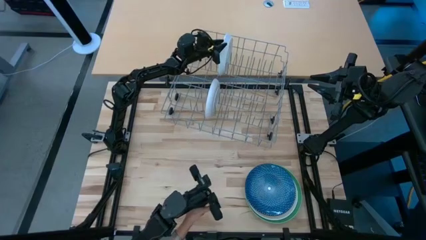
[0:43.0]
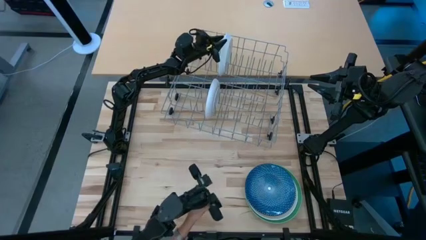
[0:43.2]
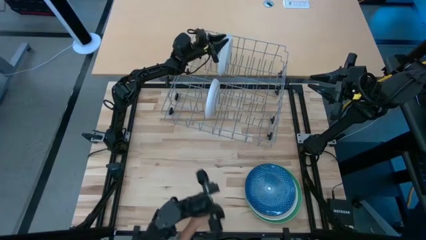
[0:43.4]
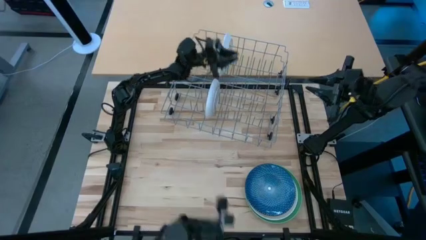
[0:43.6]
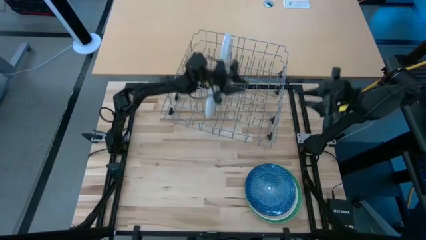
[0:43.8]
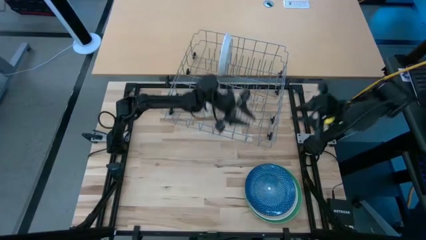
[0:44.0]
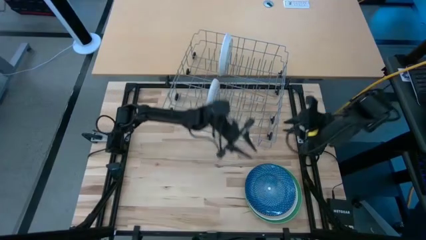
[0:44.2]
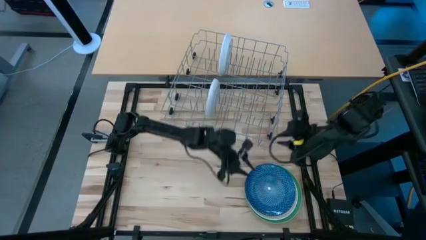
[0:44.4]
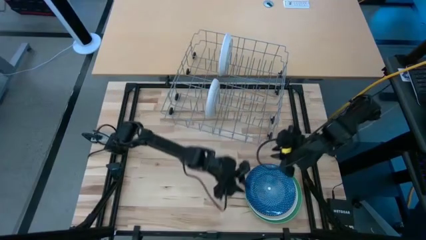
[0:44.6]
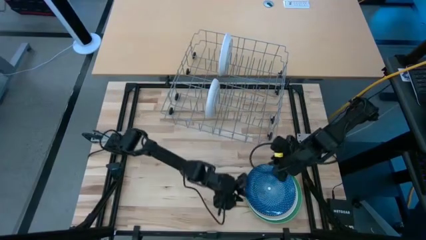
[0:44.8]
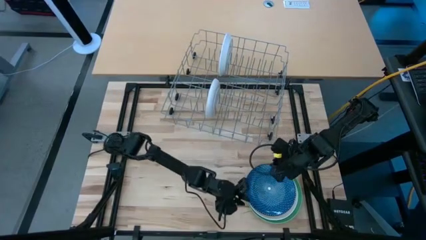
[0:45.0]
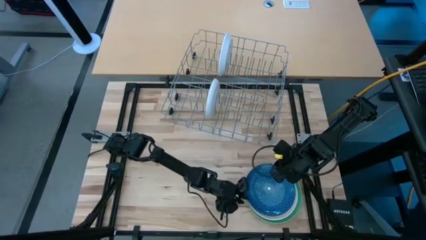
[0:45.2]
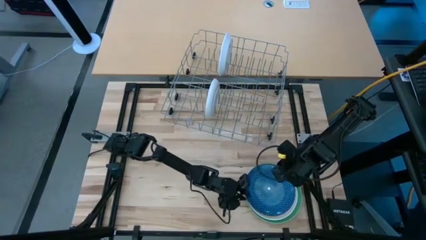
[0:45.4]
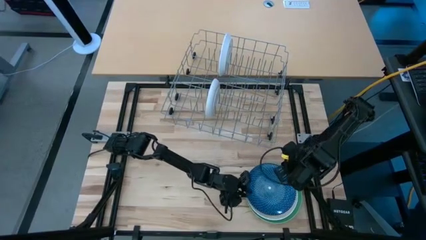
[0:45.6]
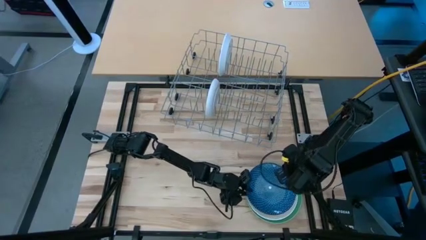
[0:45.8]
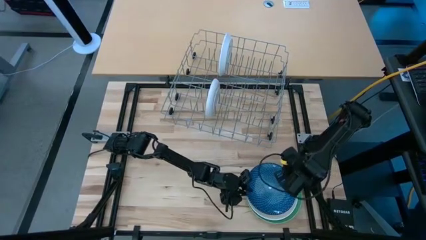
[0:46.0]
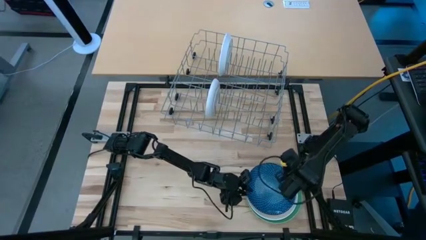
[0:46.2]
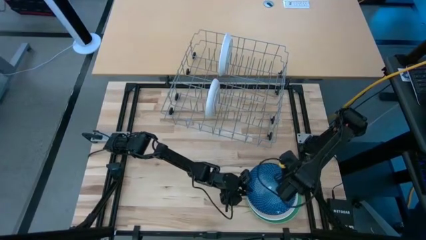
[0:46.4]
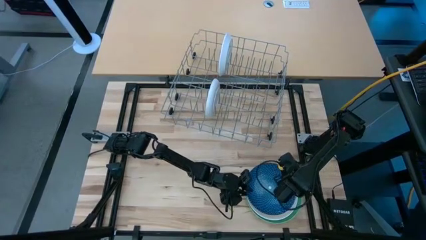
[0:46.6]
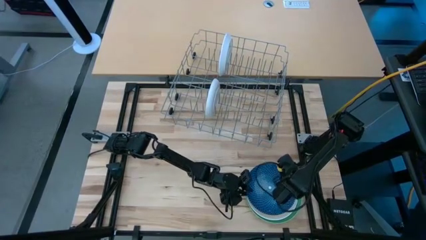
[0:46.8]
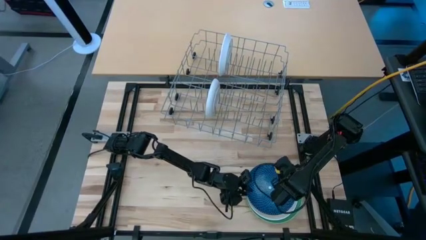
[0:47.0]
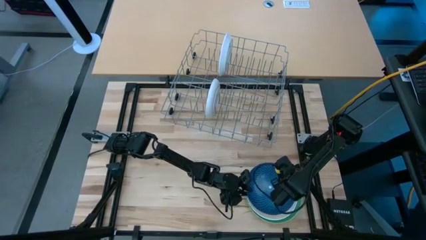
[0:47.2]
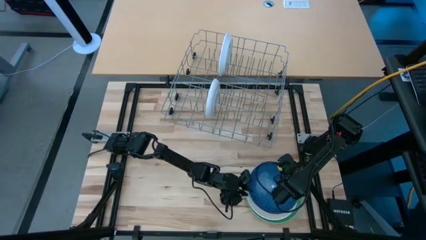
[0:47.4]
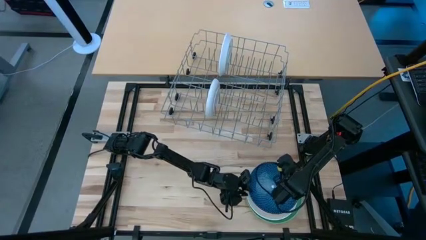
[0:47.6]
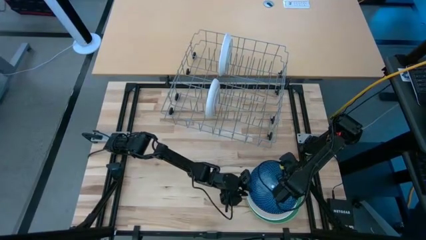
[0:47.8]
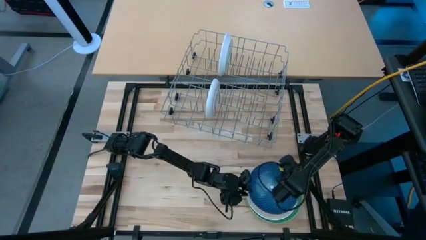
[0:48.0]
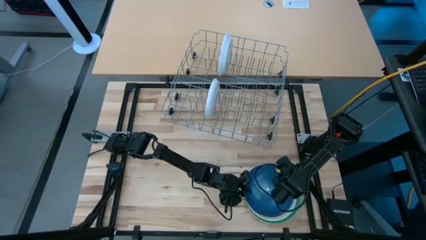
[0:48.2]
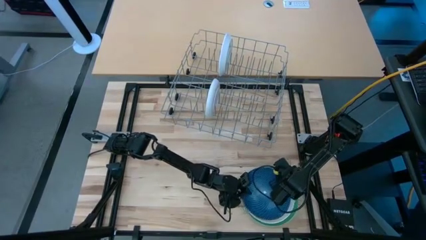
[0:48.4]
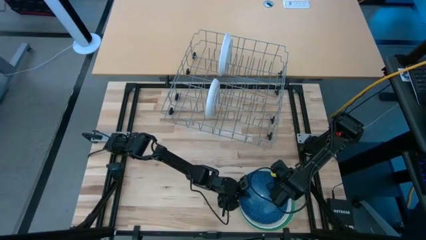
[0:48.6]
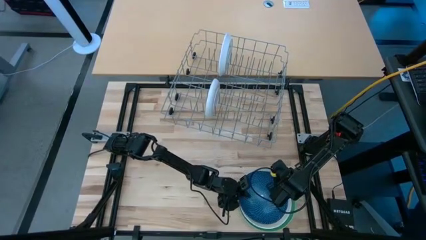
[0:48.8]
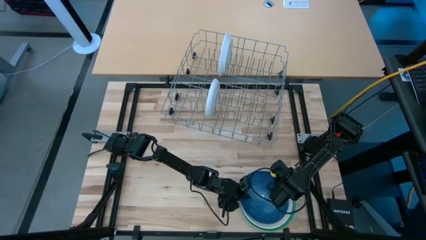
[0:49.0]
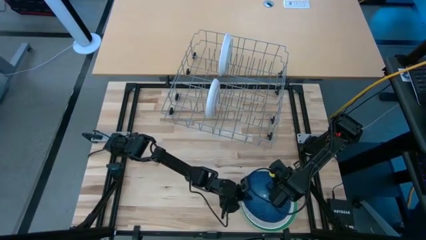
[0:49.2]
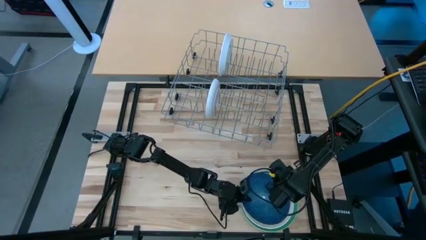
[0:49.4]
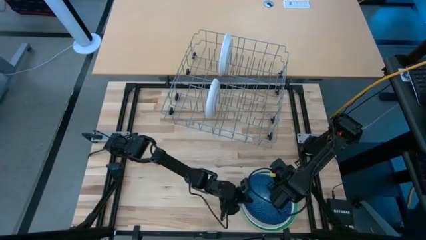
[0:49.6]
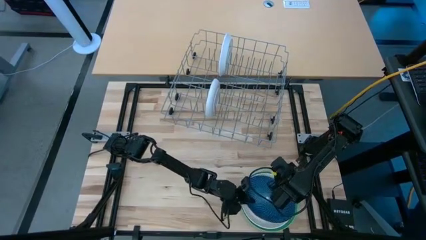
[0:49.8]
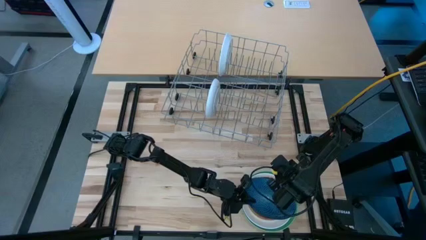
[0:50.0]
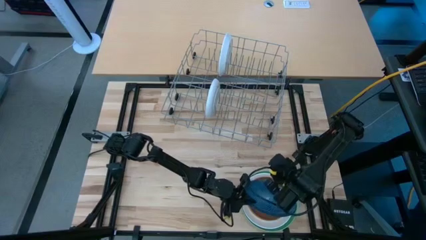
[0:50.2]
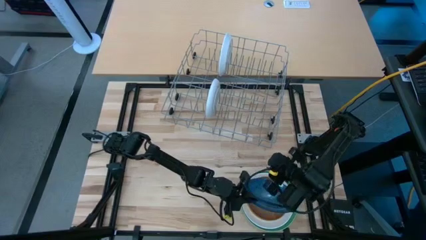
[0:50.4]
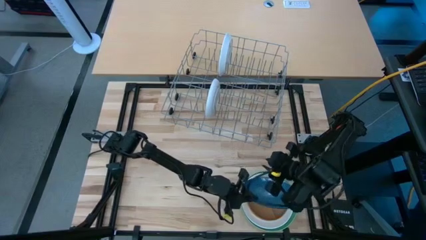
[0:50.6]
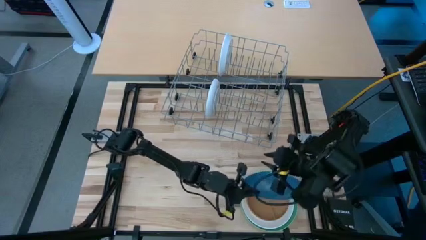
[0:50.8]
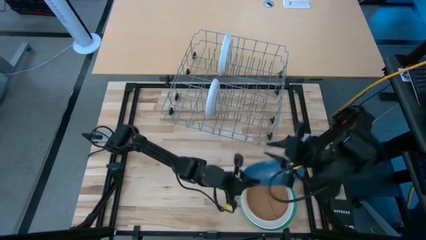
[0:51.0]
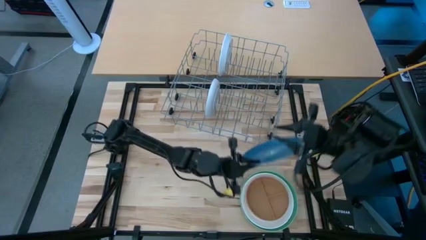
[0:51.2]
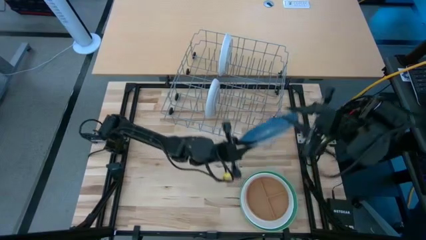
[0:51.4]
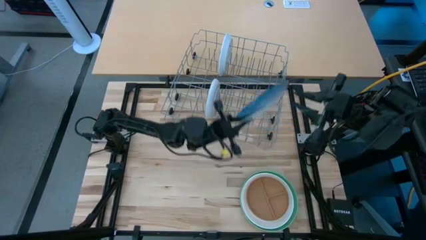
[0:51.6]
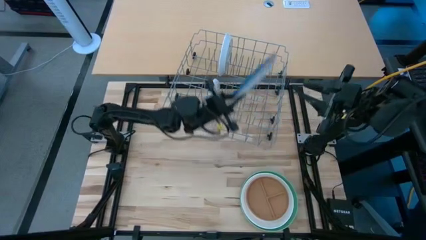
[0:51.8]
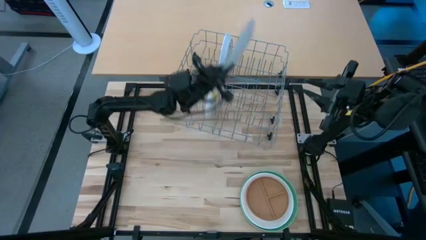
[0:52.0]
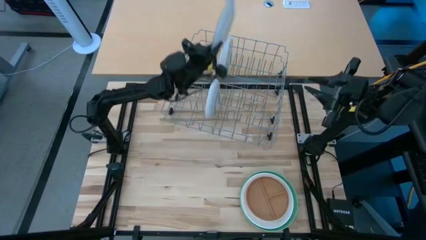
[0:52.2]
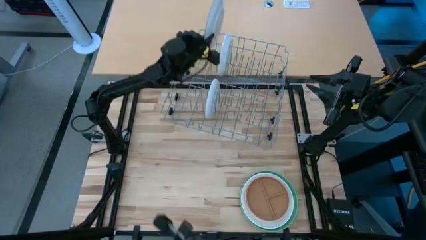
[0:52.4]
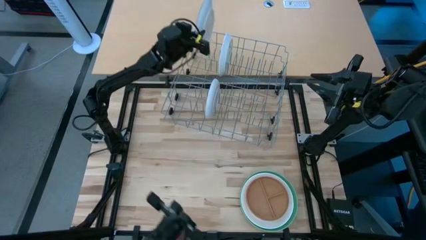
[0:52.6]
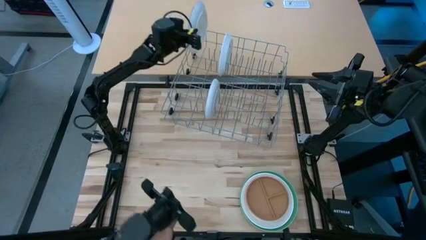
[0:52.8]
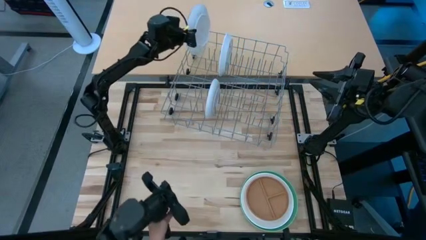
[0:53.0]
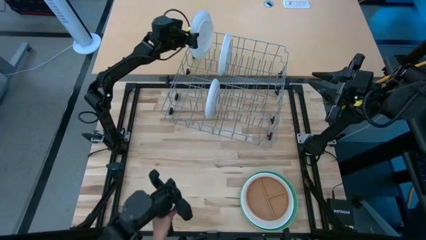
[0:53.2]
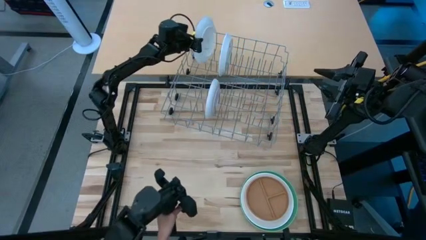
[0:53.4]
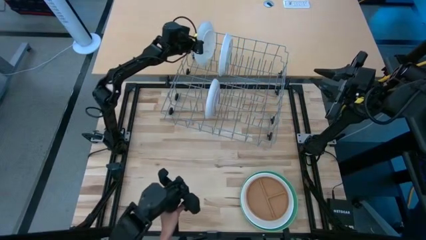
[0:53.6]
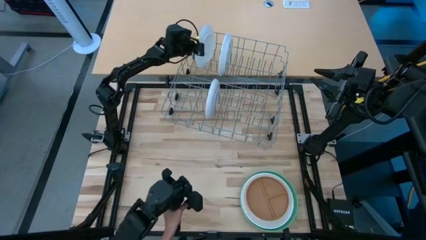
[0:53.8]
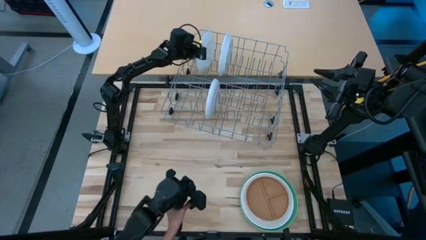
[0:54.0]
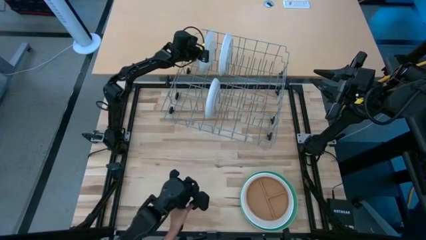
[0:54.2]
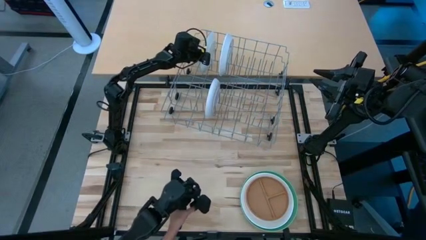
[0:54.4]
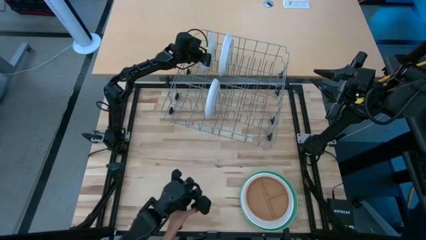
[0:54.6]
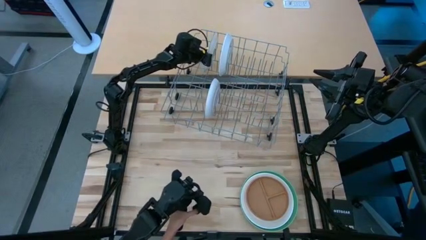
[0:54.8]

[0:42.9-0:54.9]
Task: Sort dishes
Put the blue plate into the gray dishwasher rack

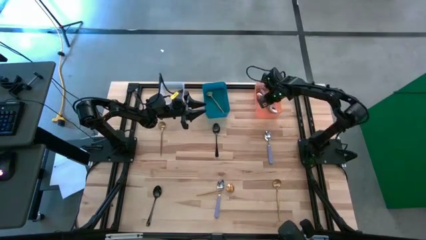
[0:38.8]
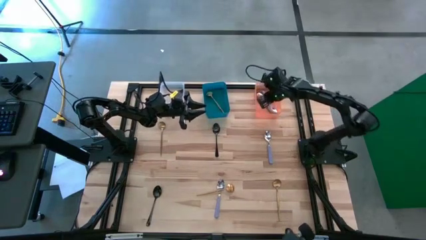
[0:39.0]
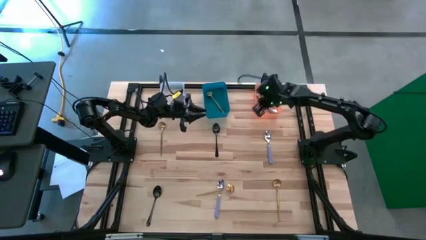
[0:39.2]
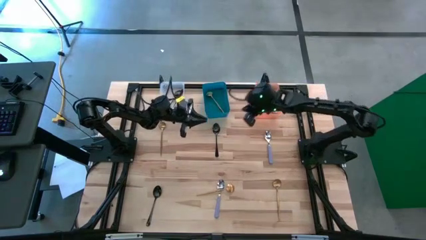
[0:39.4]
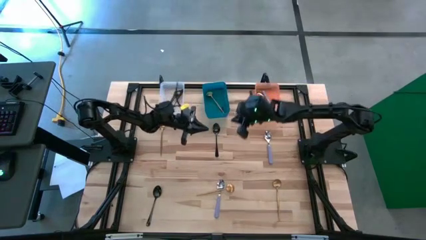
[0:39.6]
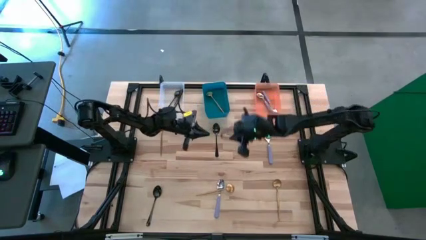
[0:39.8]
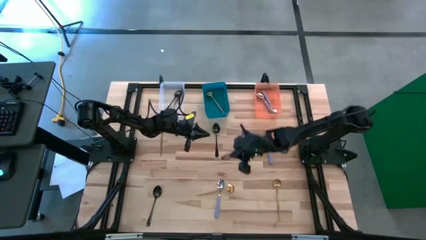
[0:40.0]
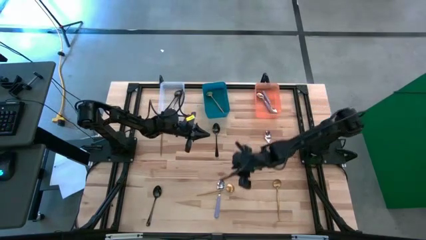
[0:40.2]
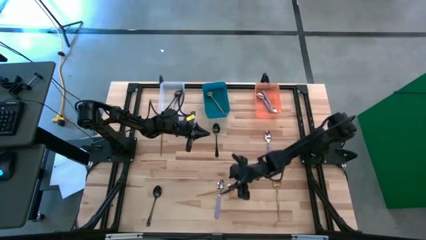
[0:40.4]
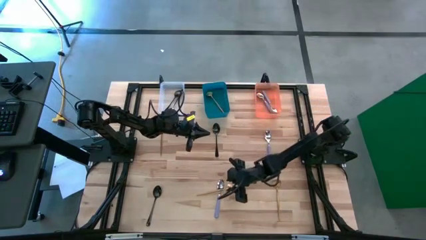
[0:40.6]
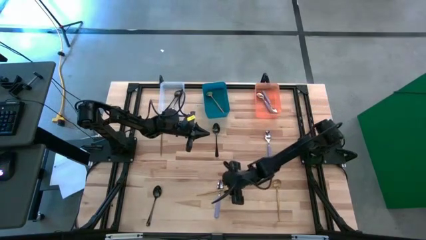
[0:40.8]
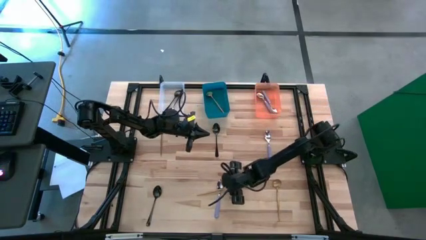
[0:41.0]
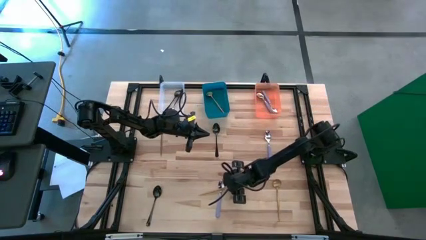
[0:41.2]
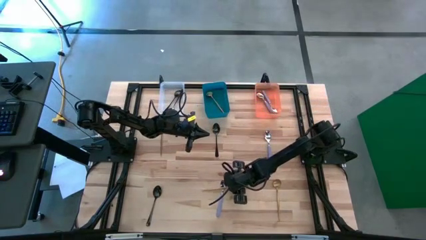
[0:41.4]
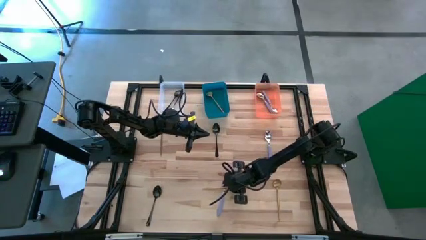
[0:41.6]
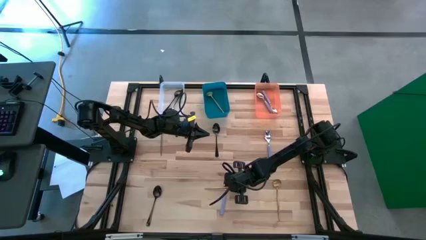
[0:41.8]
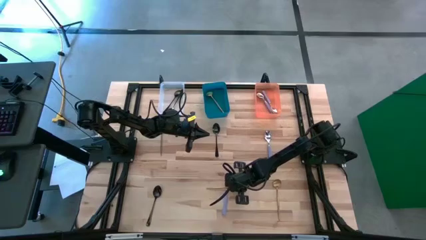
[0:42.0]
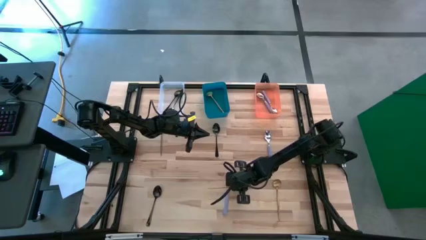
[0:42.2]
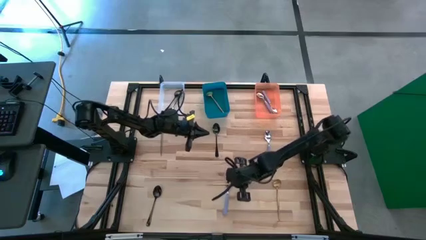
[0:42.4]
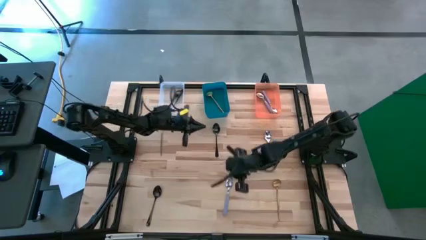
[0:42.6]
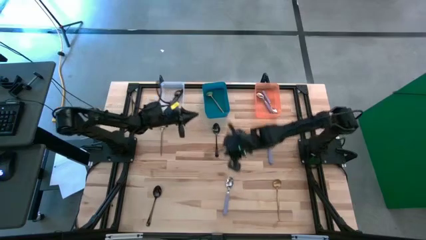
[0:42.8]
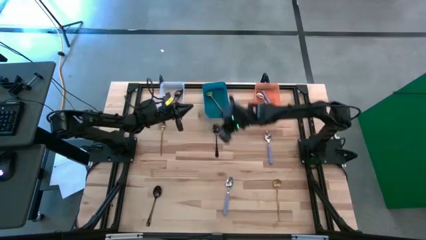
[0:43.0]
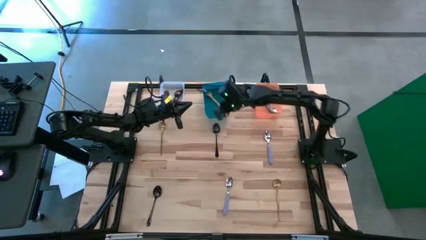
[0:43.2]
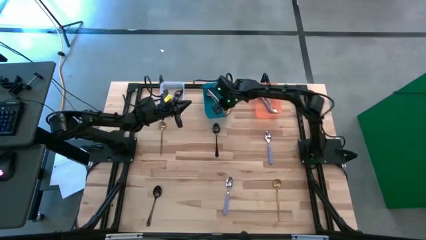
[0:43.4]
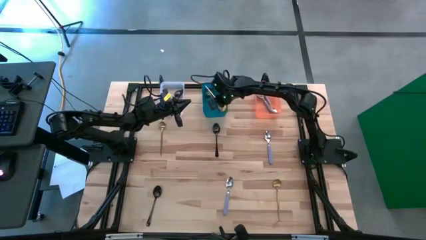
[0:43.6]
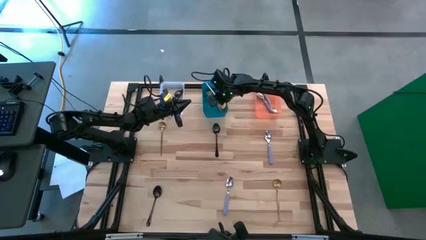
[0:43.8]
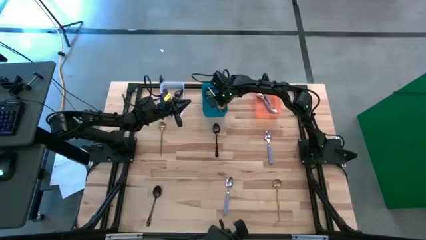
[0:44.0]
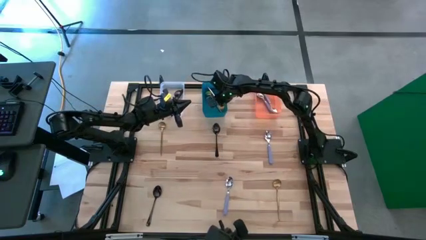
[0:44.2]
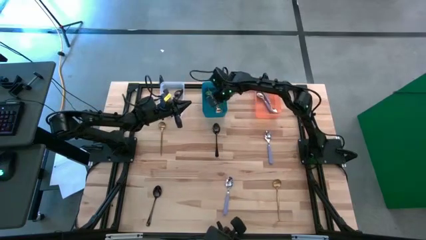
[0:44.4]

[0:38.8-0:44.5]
Task: Sort silverware by color (type)
Put the center gold spoon into the blue bin
